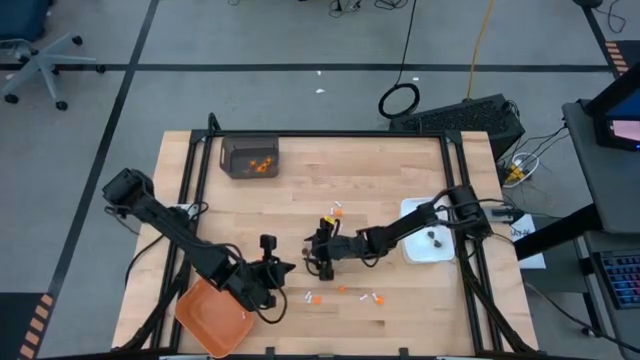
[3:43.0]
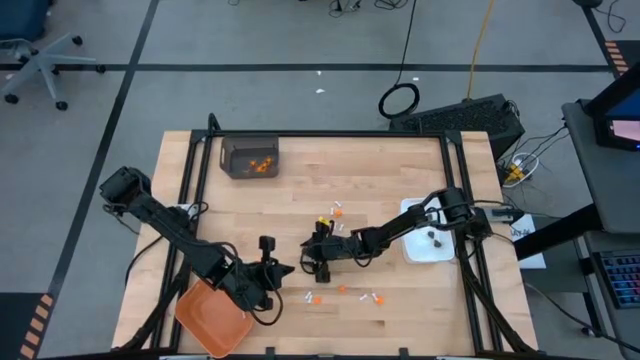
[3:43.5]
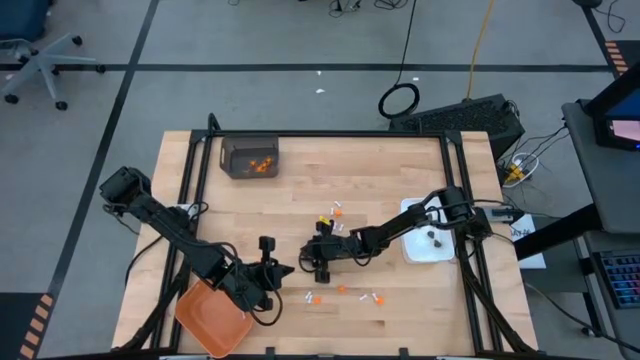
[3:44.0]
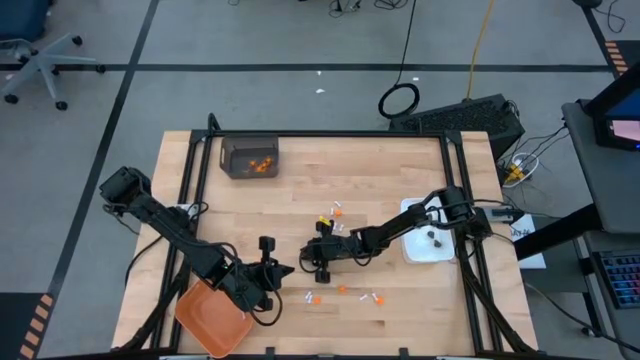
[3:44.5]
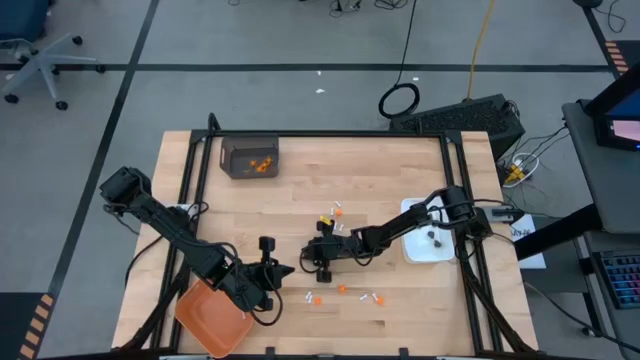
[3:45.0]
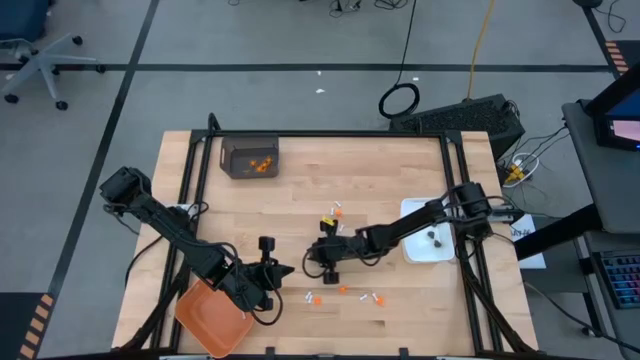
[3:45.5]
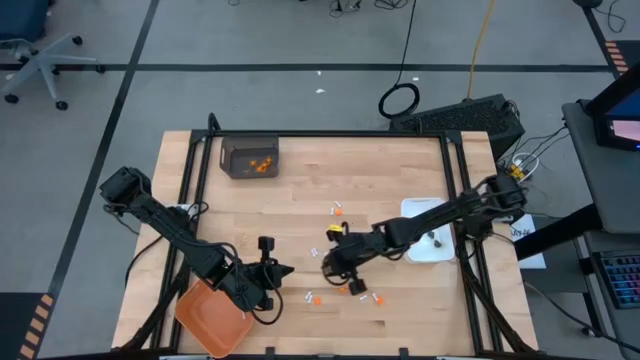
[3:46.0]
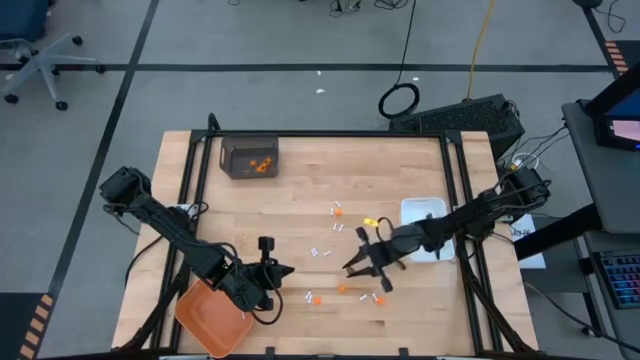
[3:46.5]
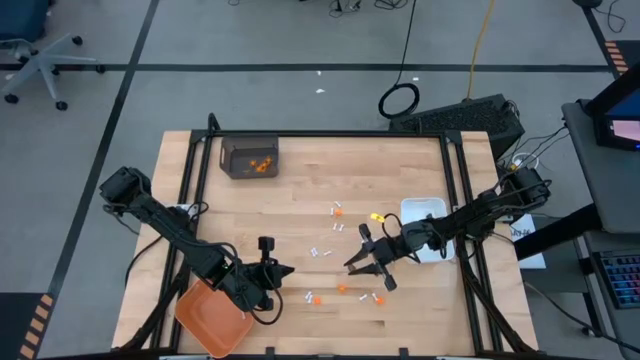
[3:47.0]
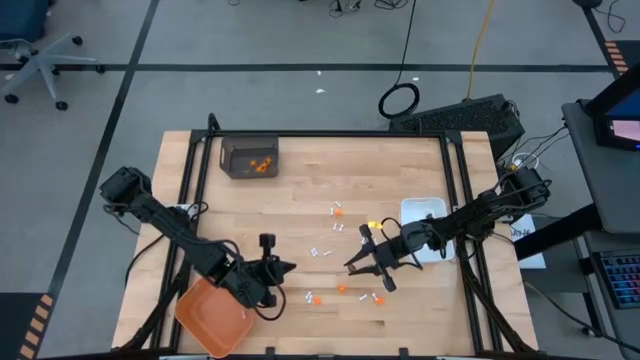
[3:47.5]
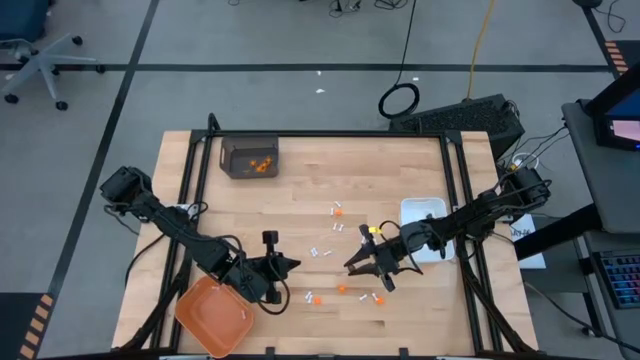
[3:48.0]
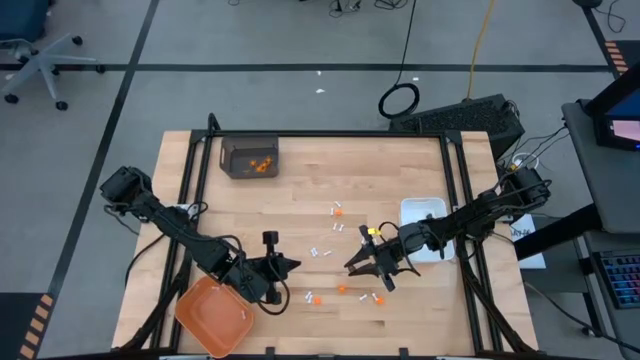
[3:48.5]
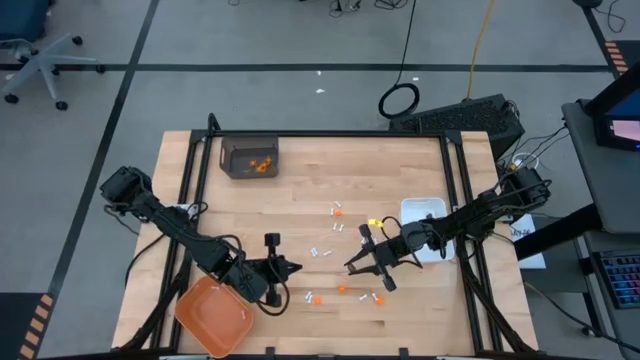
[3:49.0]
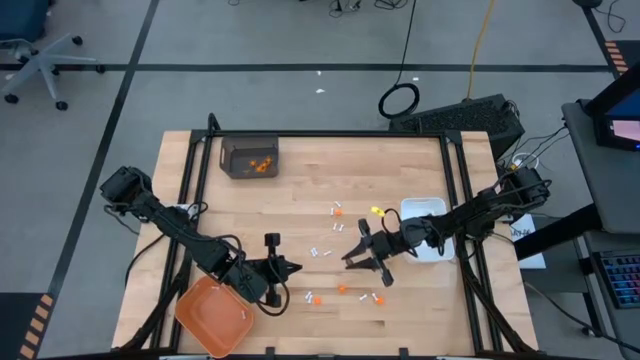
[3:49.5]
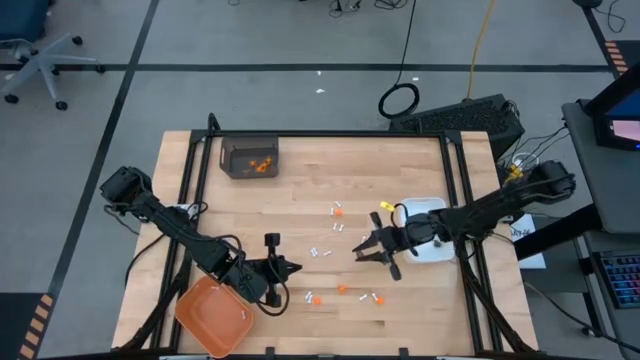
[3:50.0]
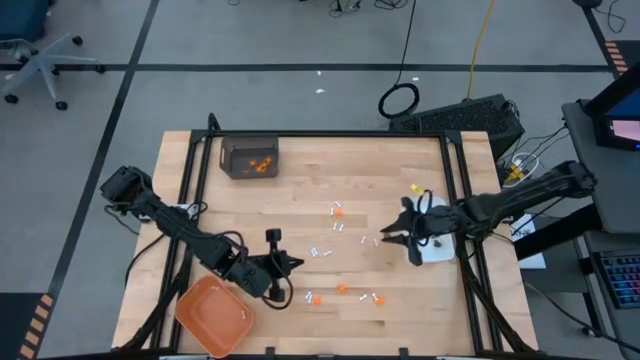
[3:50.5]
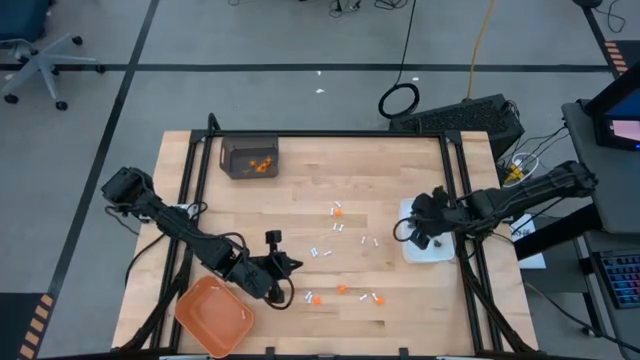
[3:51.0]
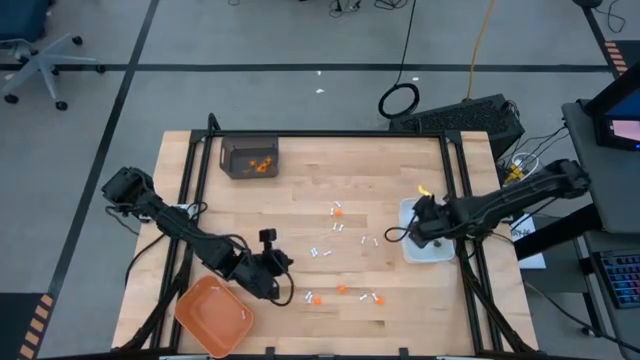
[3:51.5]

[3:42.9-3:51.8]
Task: Sort Halloween decoration
Put the black skull toy into the orange bin

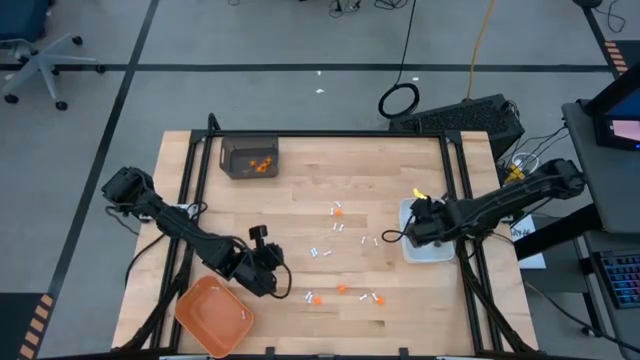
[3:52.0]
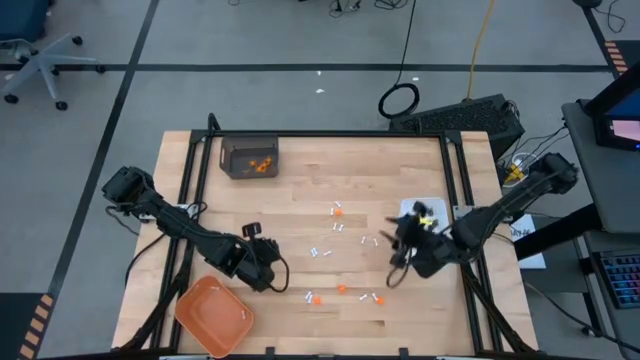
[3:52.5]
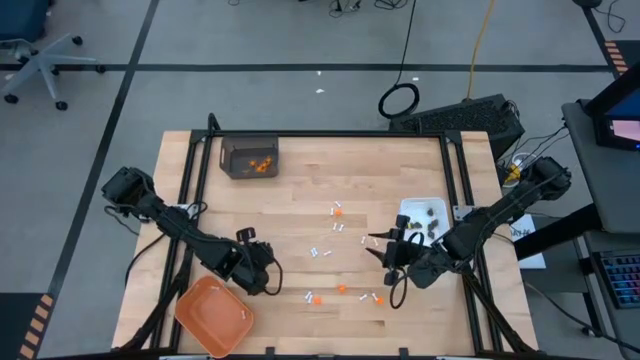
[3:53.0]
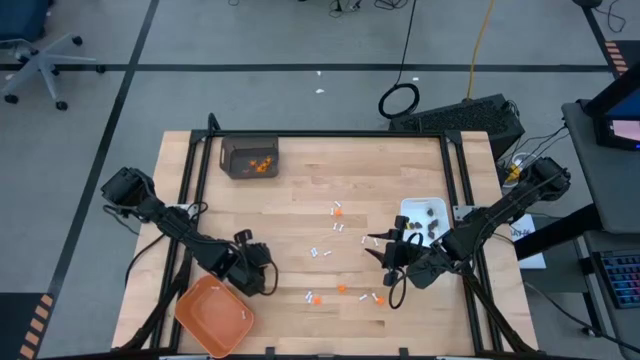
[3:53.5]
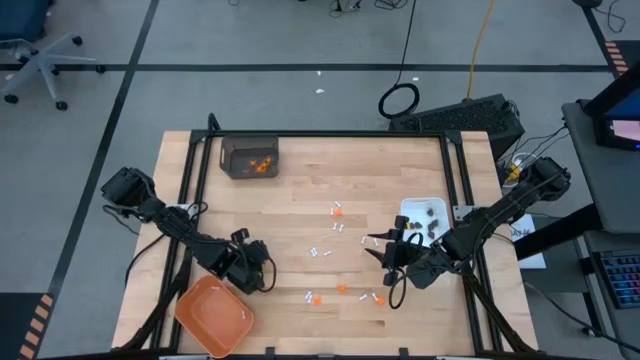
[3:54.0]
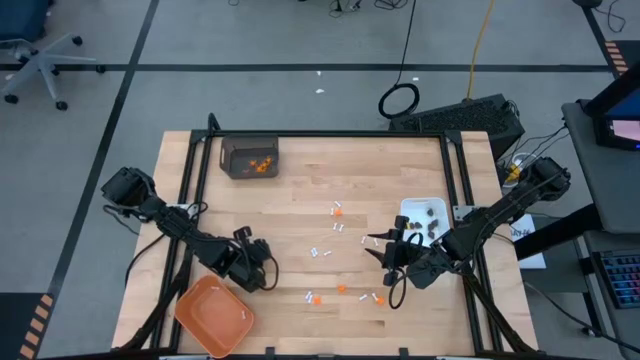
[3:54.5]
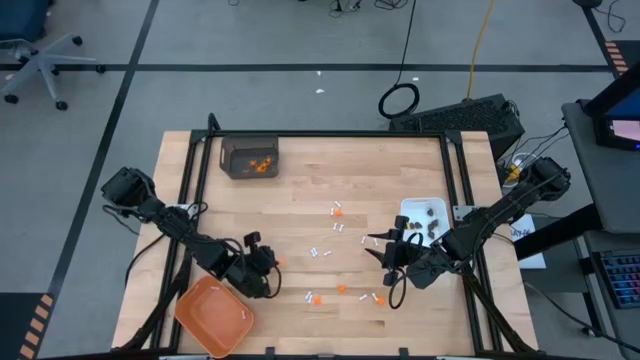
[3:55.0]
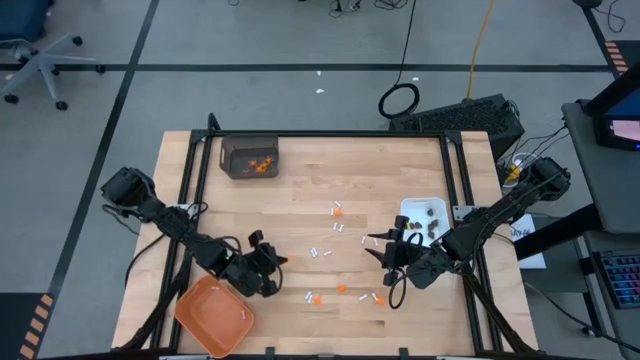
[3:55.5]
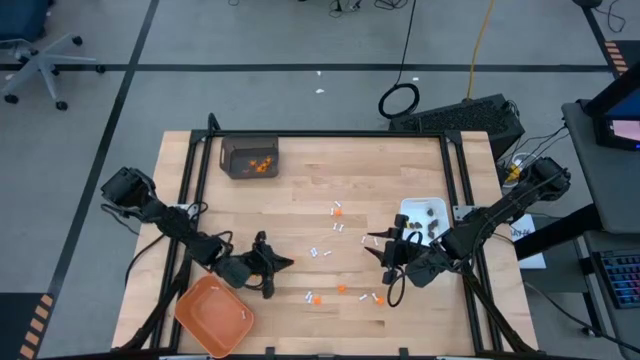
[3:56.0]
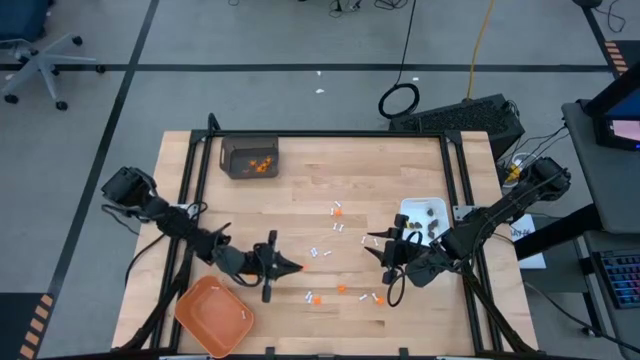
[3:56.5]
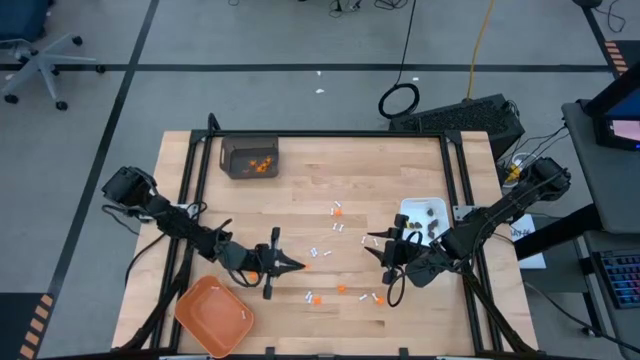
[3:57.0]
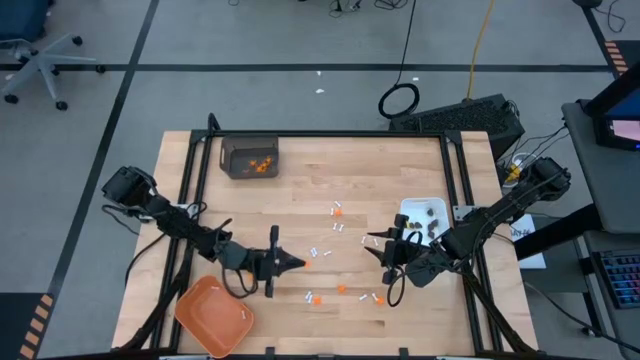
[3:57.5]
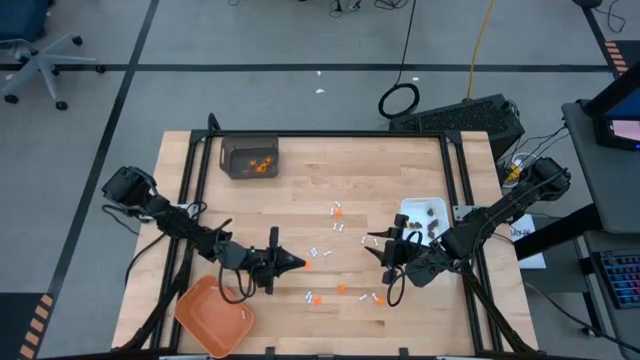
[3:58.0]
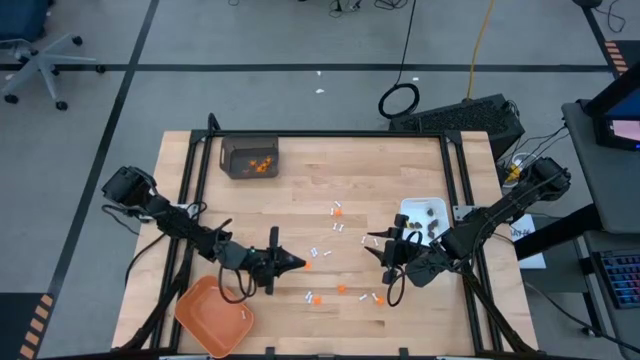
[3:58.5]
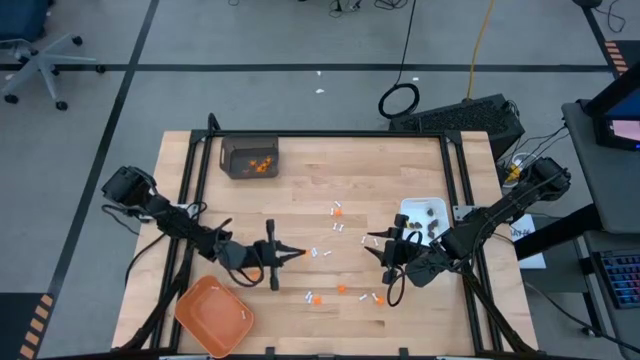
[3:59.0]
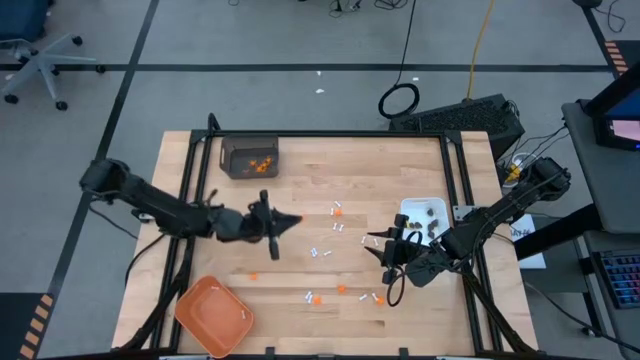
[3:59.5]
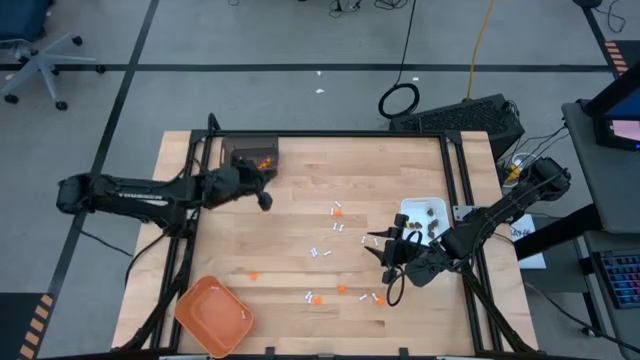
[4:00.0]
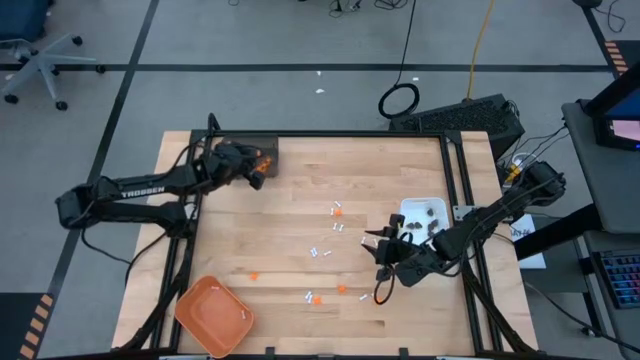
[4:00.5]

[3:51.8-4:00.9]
Put the orange spider toy into the black bin

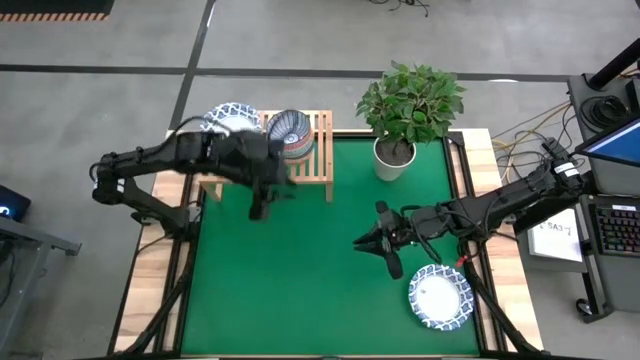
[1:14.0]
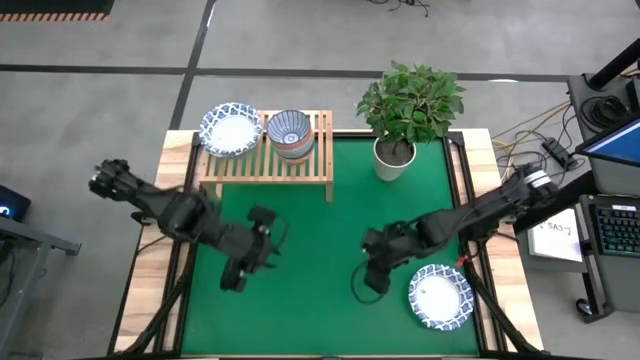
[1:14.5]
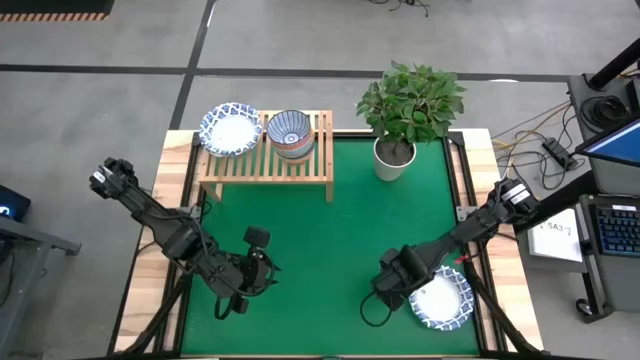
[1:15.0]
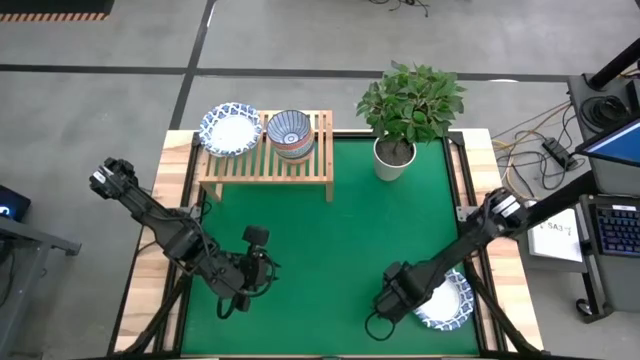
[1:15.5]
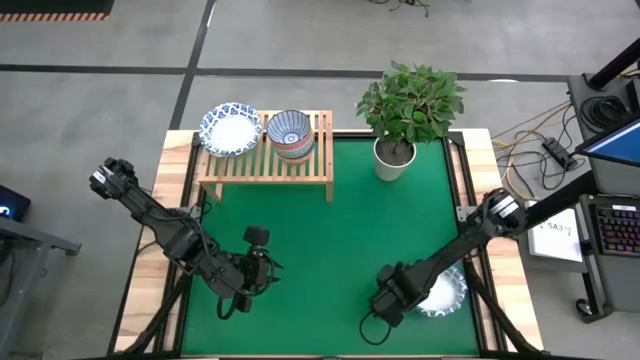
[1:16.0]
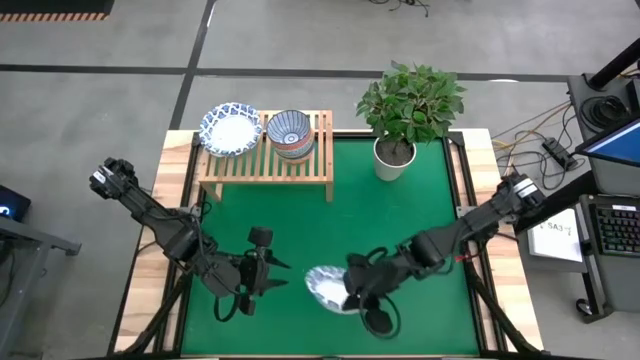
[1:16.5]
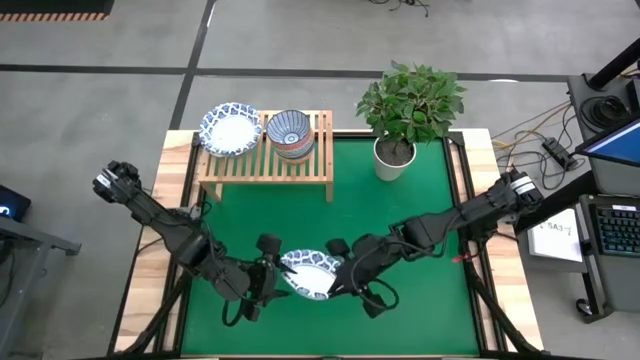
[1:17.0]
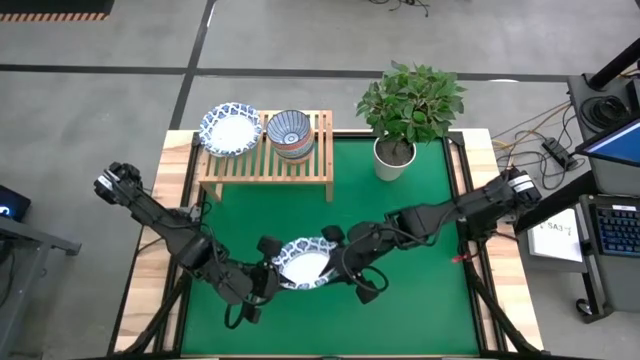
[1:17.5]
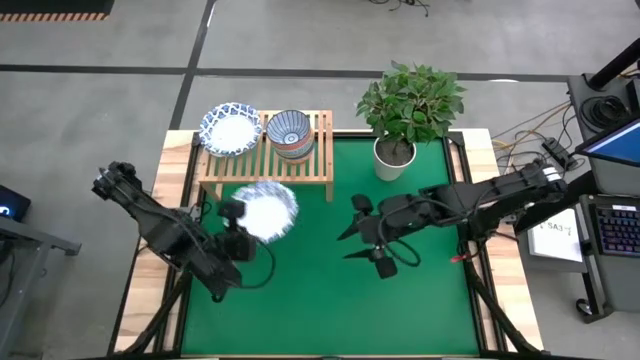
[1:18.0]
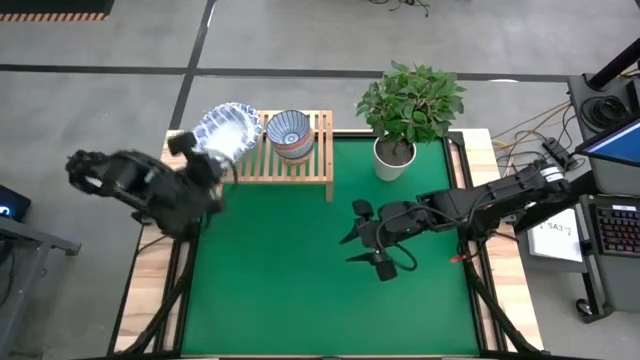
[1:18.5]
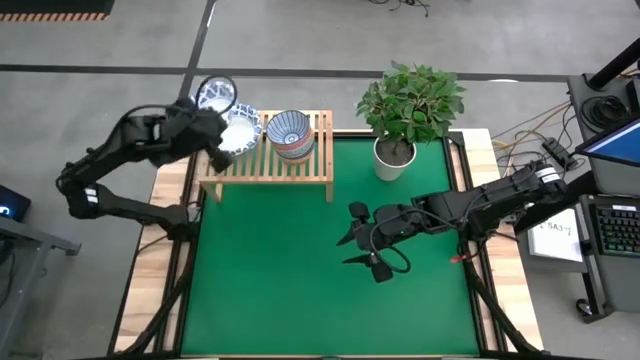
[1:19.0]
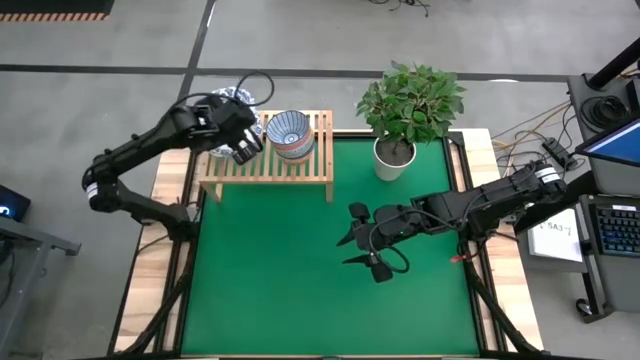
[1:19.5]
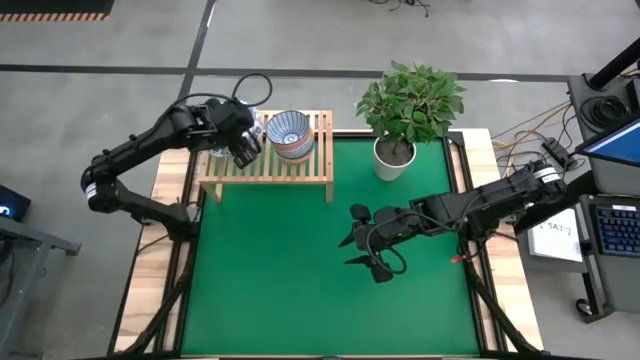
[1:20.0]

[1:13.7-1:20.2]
Task: Place and stack bowls onto a shelf
Stack the white bowl on top of the other white bowl on the shelf
